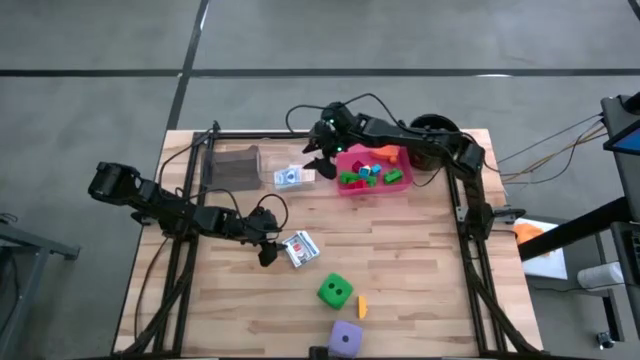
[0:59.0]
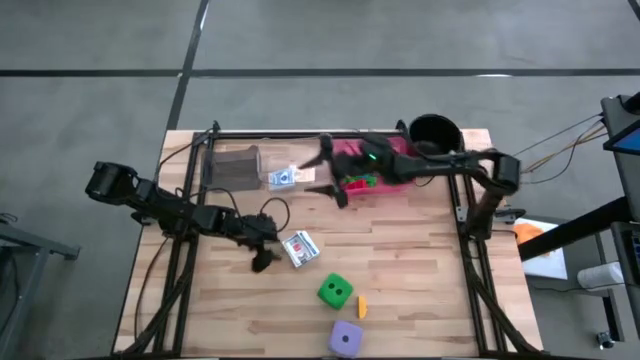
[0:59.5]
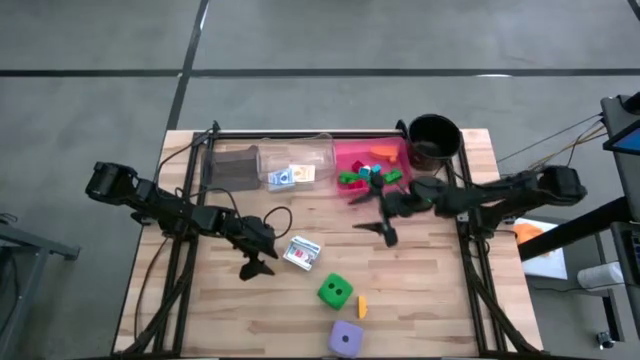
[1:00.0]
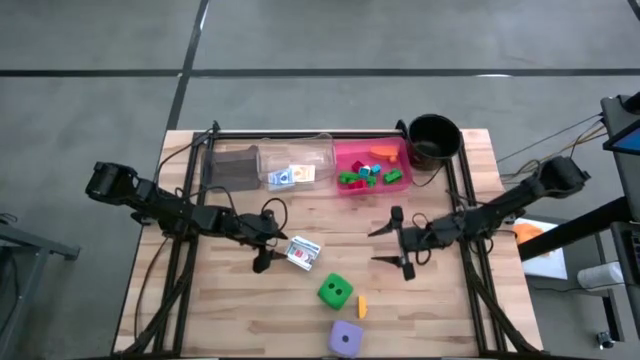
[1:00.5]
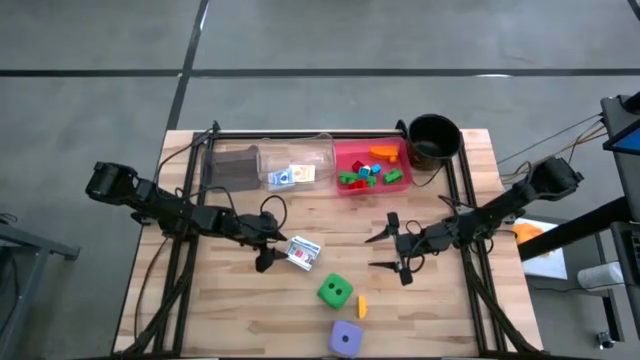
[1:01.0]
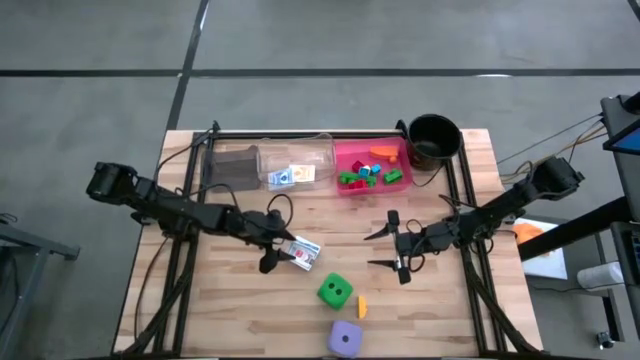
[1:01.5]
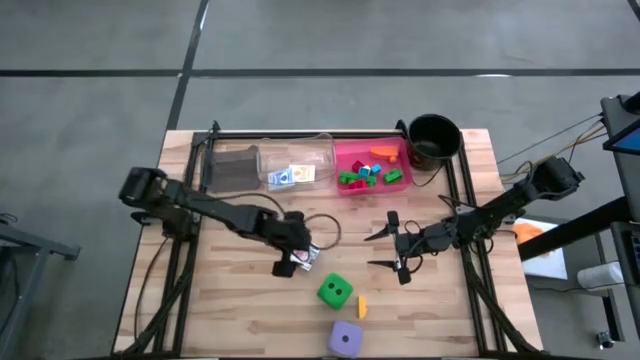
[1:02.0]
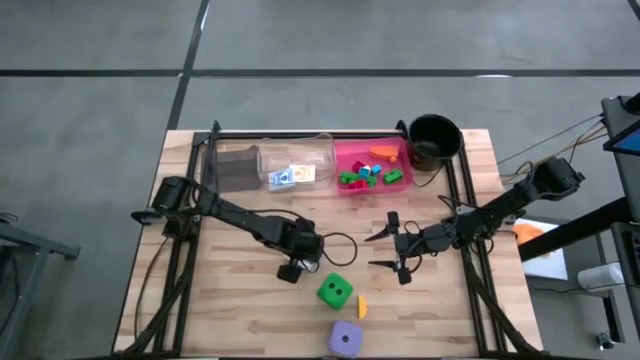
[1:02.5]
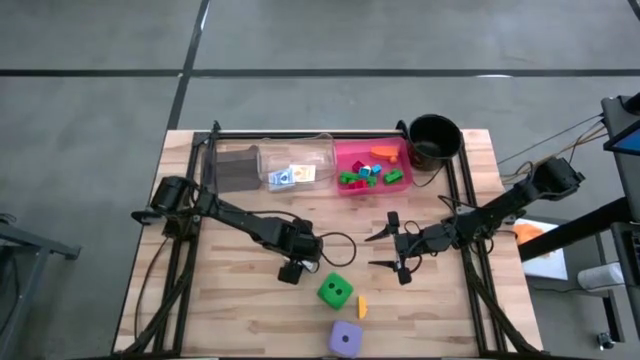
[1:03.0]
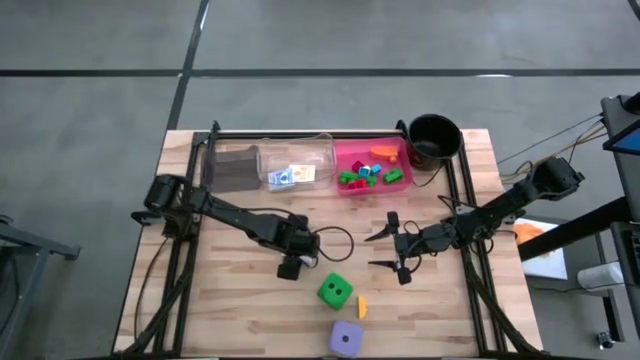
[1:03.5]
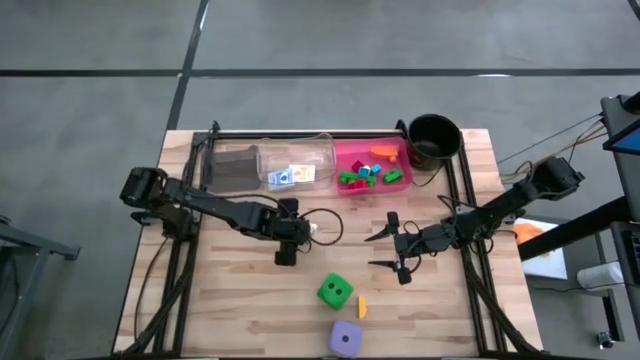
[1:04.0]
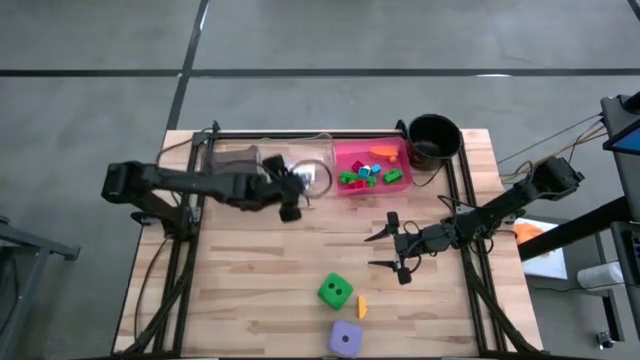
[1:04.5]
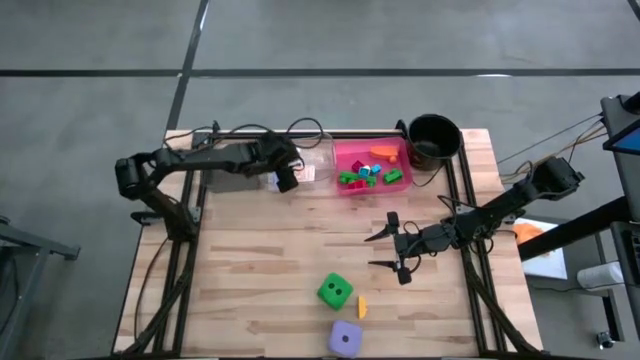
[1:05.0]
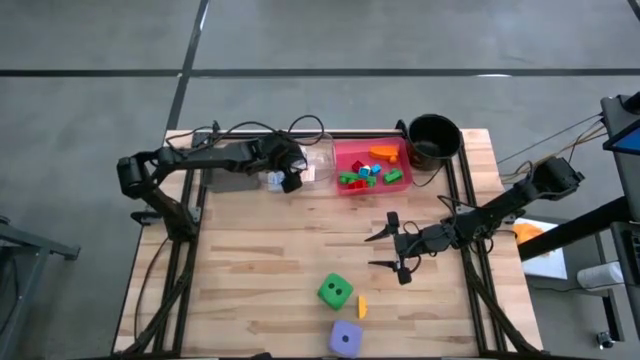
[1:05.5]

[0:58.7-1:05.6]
Task: Pick & Place Toys
Put the white game card into the transparent bin

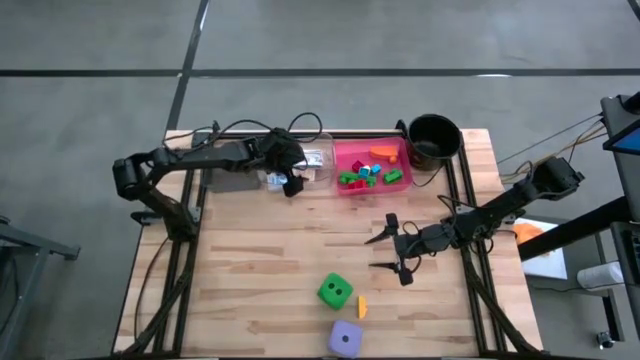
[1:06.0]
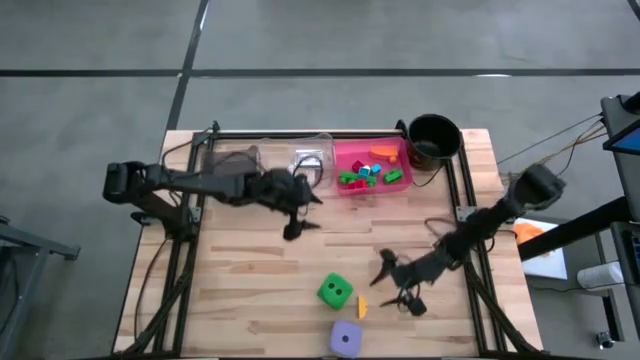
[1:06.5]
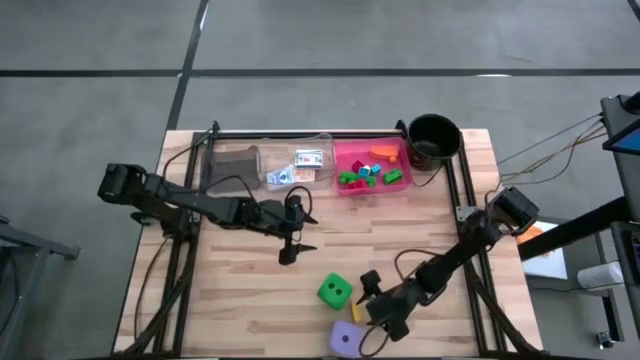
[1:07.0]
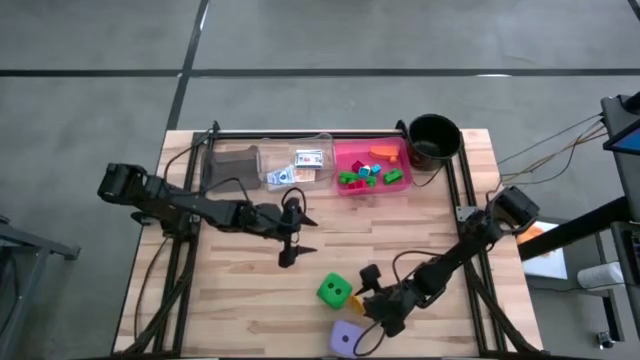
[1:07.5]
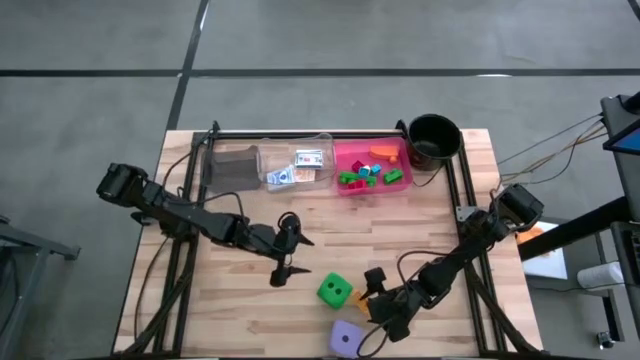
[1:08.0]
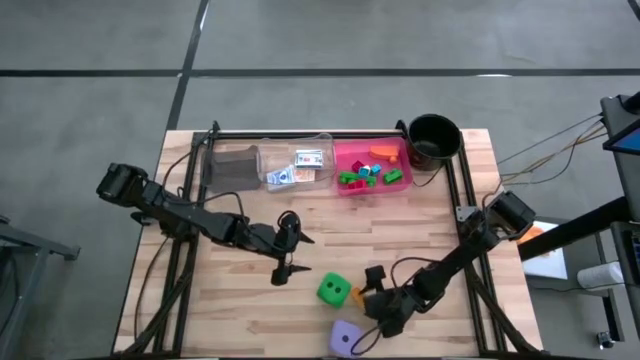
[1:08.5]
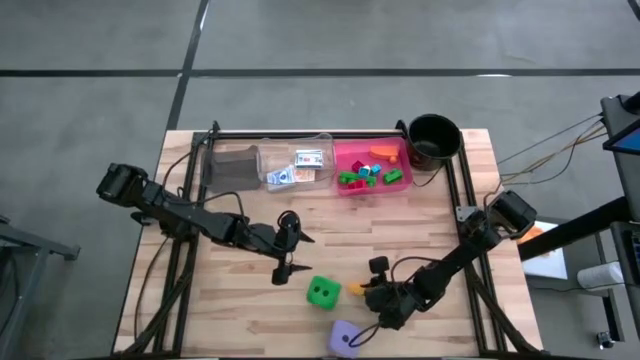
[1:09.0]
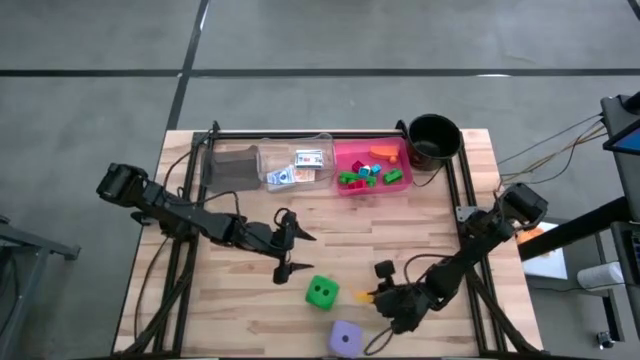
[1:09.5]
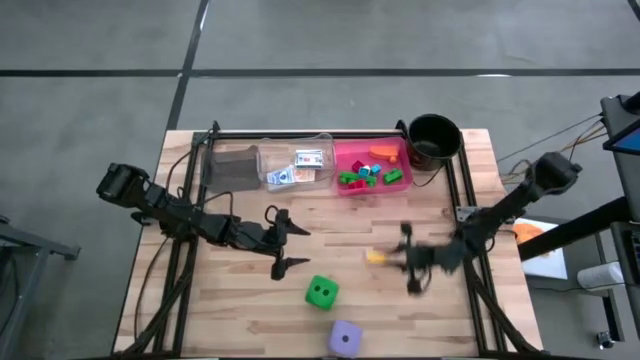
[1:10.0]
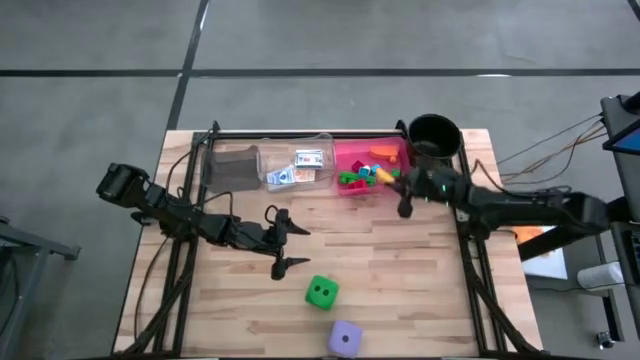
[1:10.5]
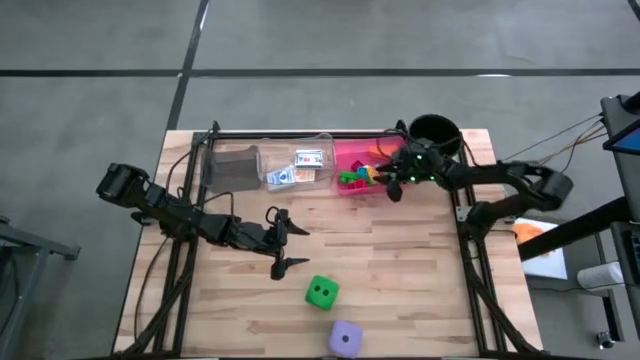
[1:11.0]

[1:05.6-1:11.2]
Put the yellow game piece into the pink bin

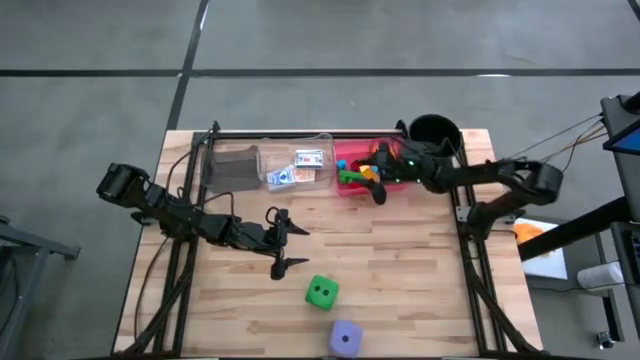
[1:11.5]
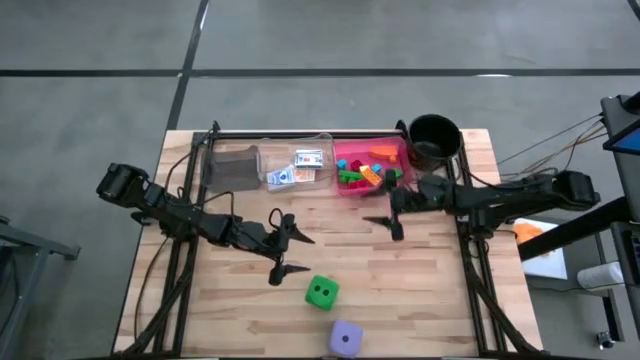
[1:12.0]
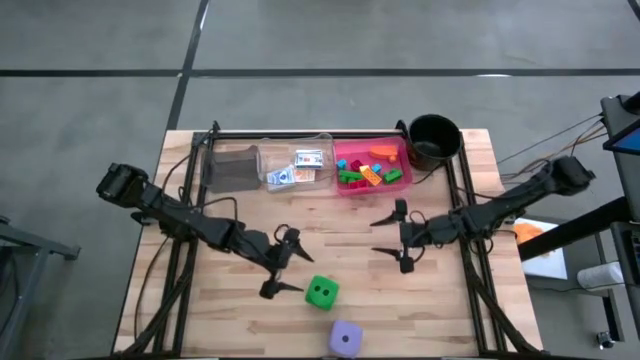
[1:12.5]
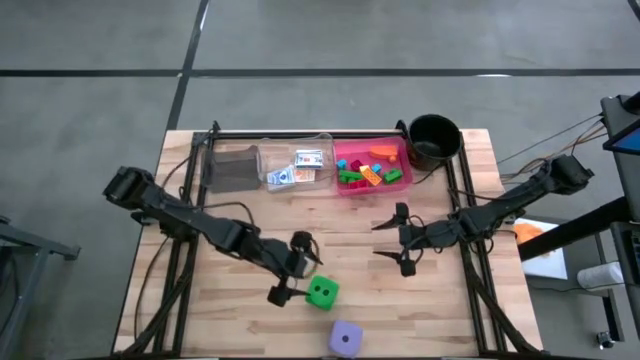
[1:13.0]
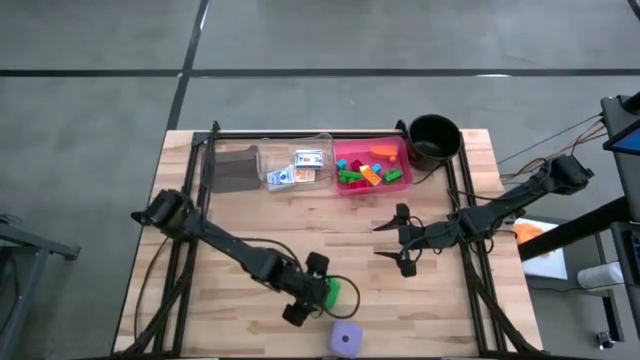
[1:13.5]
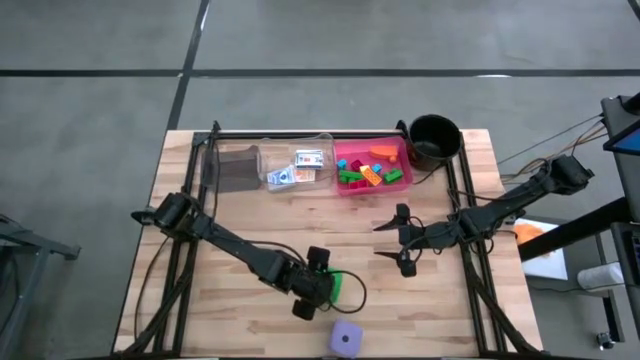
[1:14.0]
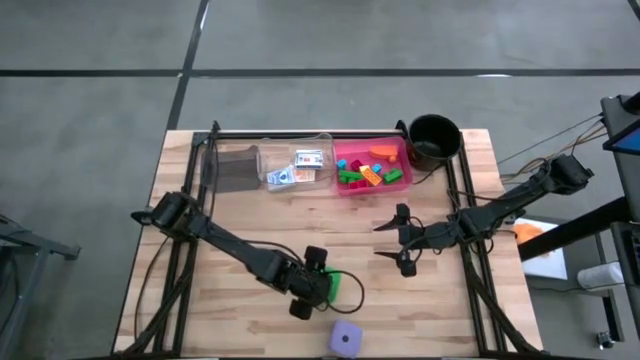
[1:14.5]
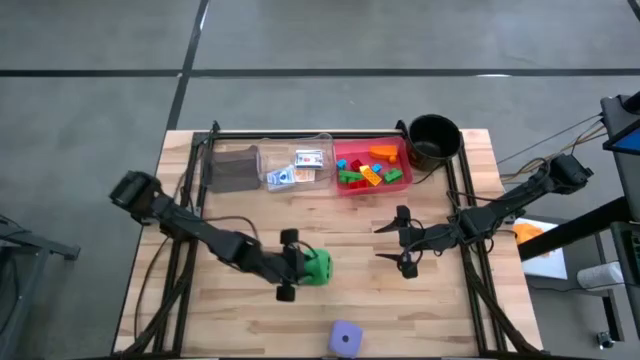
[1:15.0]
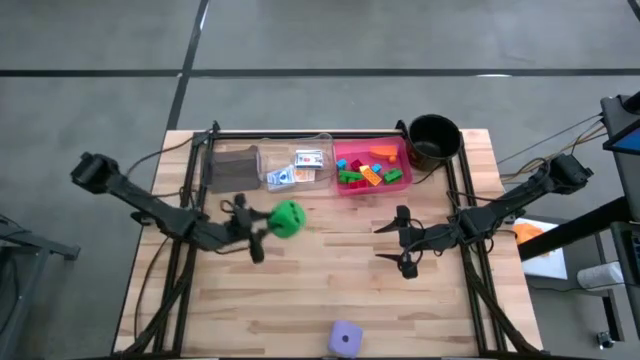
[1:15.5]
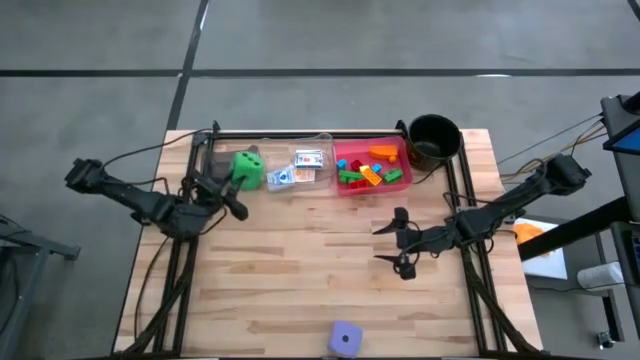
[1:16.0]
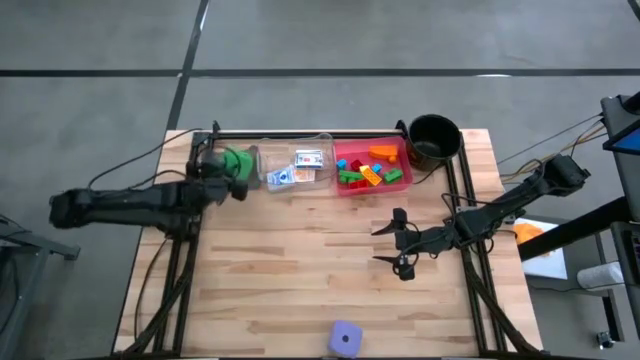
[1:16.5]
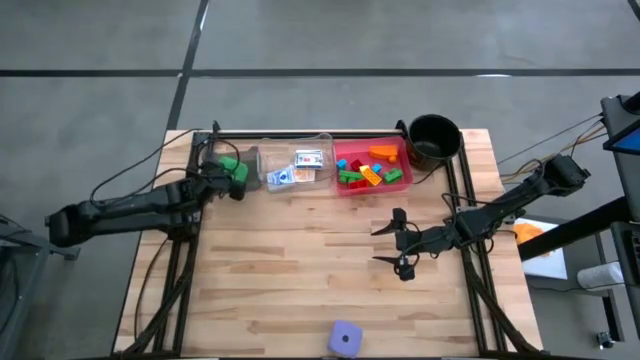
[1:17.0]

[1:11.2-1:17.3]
Put the green game die into the black bin

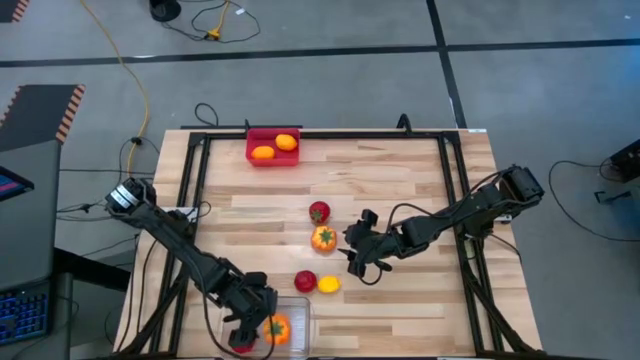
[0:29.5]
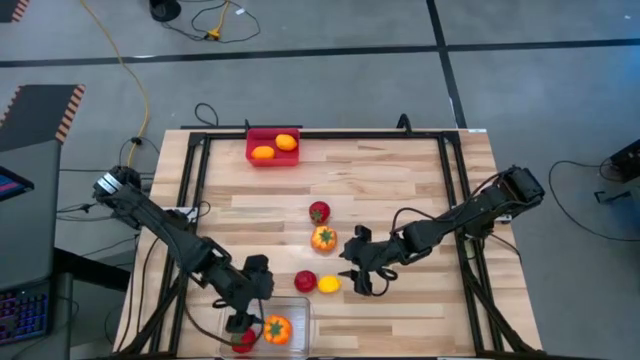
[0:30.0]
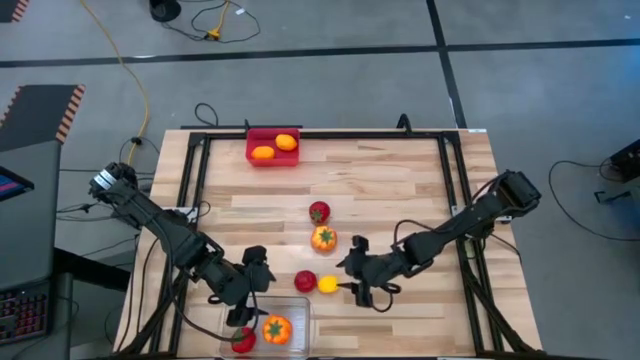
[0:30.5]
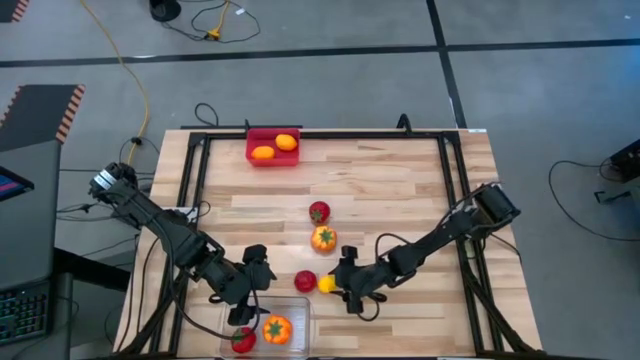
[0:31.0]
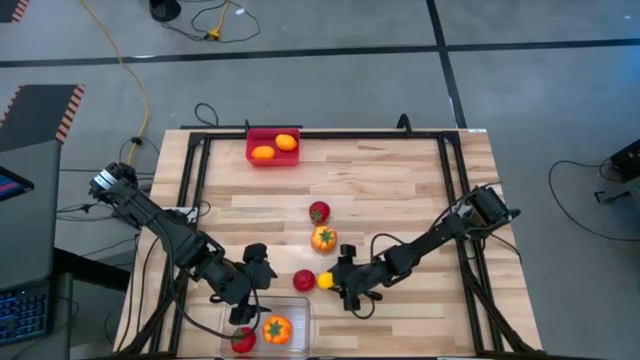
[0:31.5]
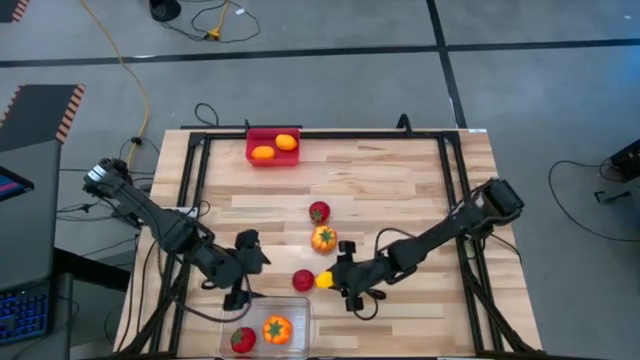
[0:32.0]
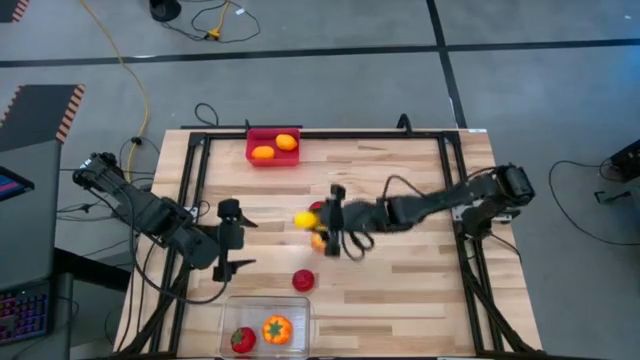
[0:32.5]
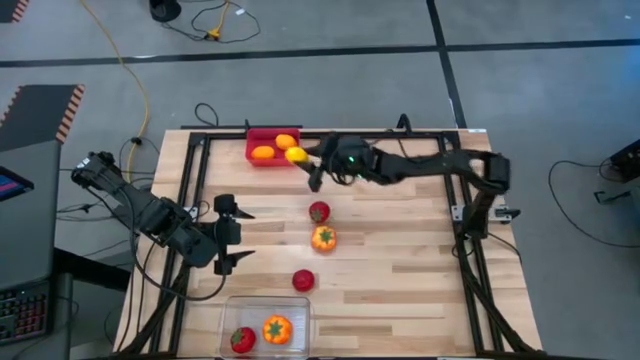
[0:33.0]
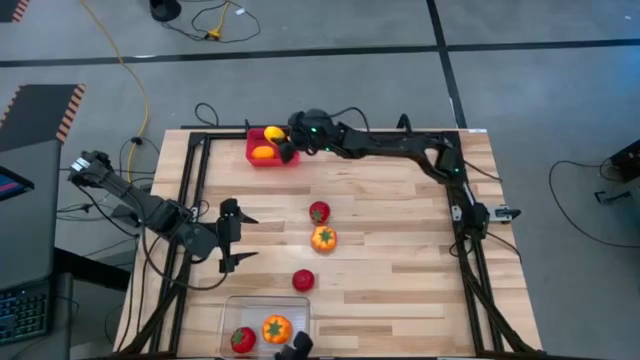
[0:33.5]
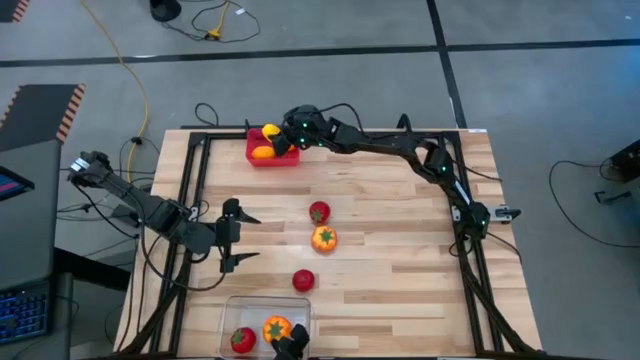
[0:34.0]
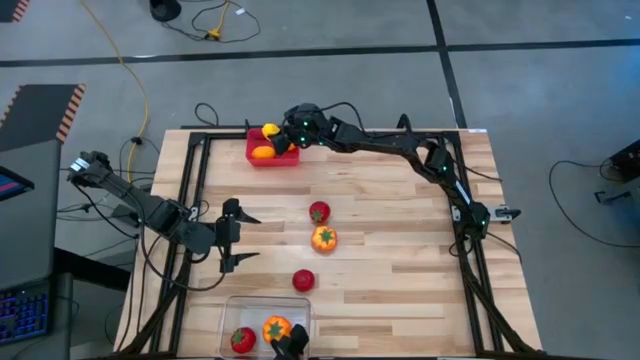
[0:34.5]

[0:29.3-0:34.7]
Task: Sort produce into baskets
Put the yellow lemon into the red bin
